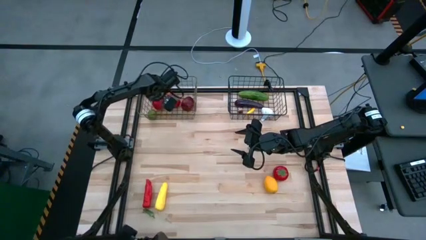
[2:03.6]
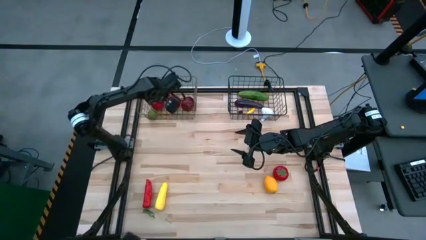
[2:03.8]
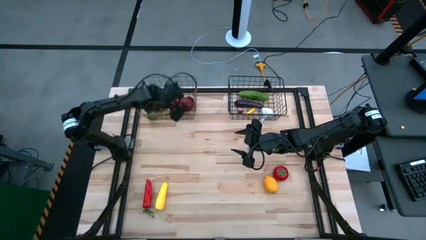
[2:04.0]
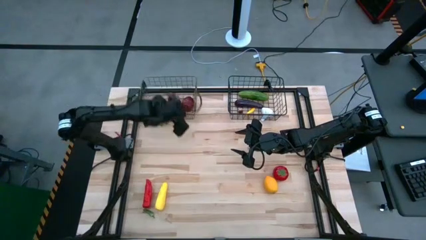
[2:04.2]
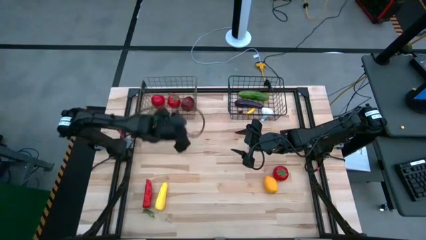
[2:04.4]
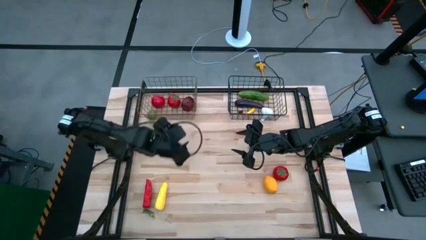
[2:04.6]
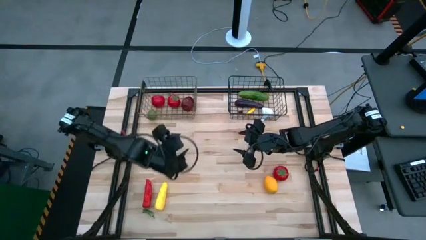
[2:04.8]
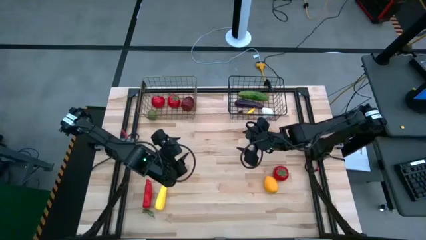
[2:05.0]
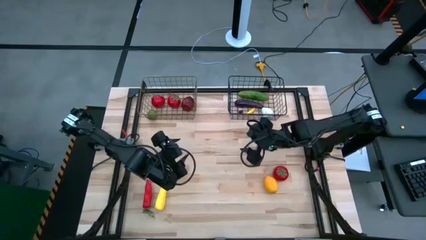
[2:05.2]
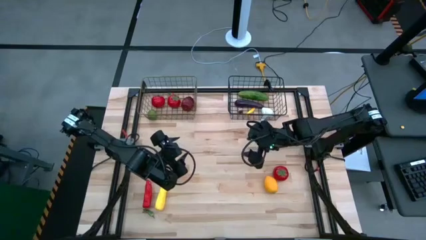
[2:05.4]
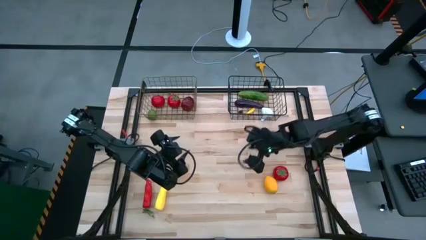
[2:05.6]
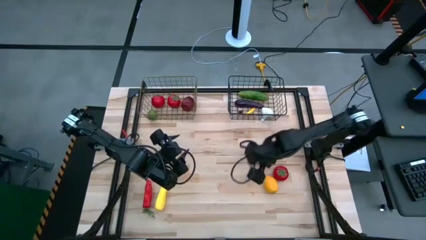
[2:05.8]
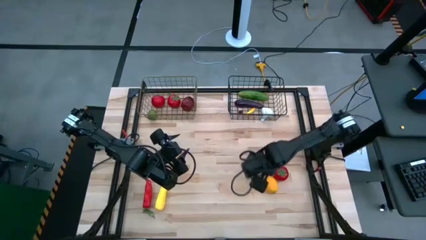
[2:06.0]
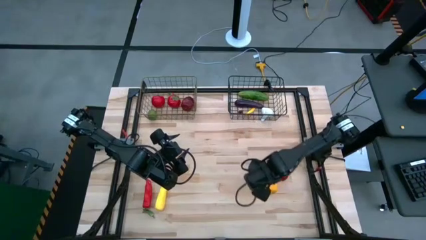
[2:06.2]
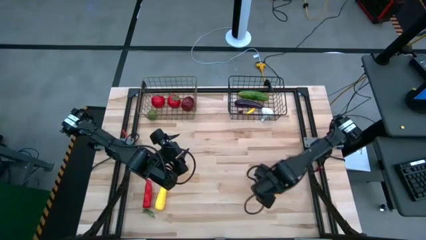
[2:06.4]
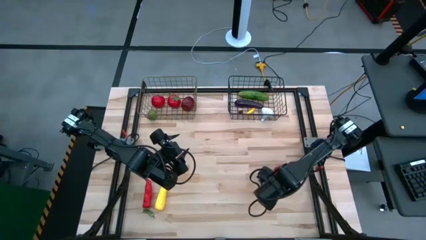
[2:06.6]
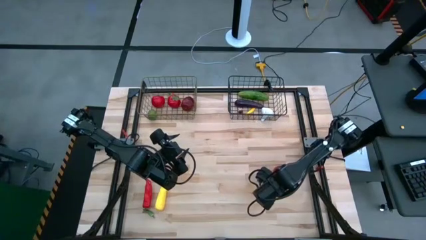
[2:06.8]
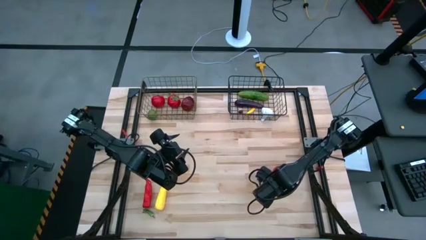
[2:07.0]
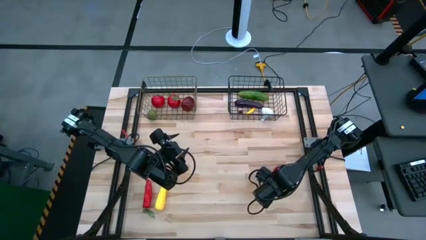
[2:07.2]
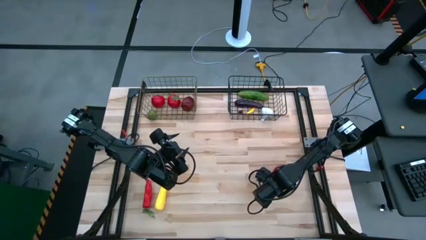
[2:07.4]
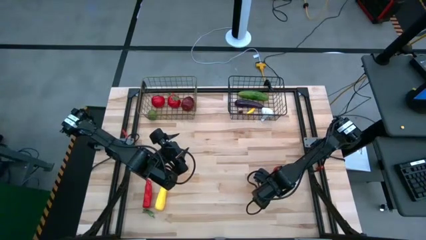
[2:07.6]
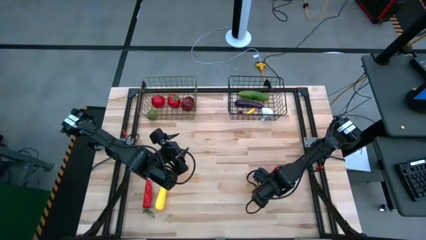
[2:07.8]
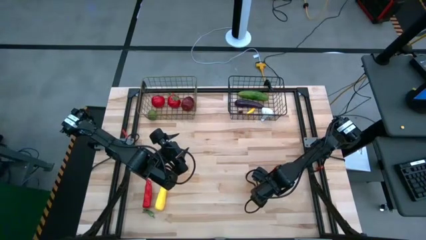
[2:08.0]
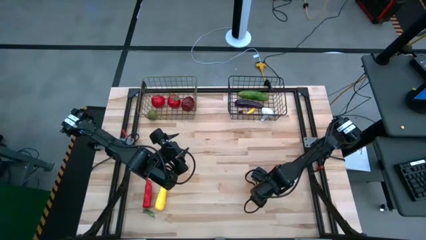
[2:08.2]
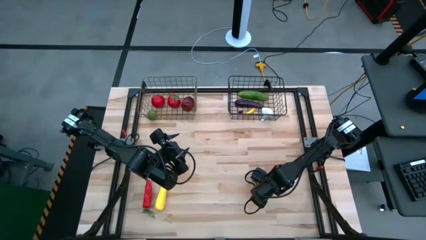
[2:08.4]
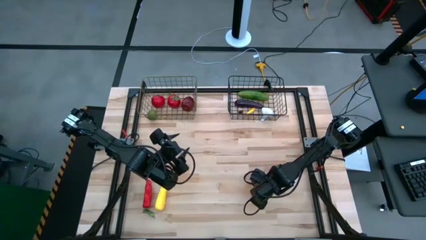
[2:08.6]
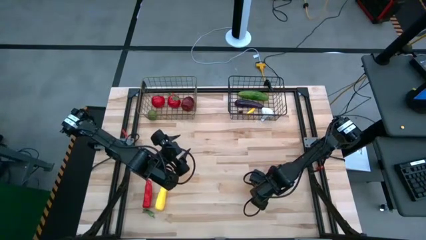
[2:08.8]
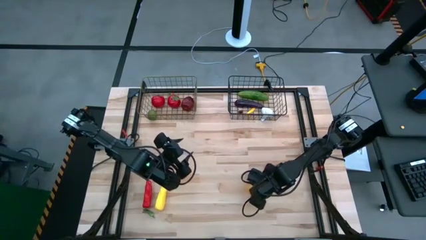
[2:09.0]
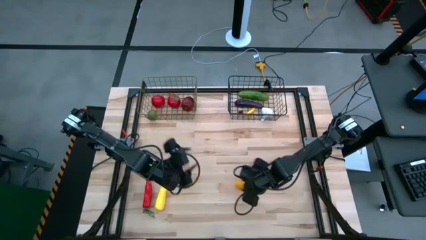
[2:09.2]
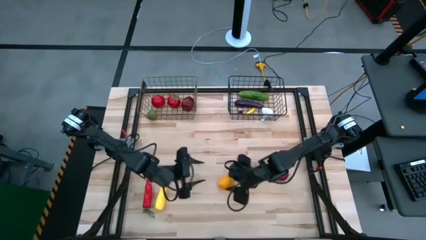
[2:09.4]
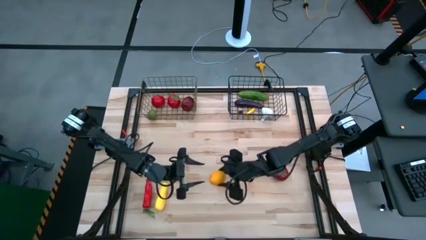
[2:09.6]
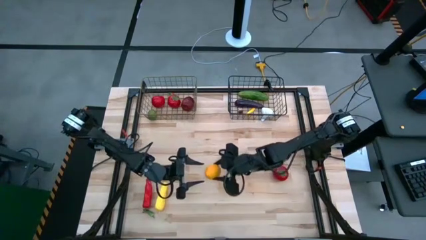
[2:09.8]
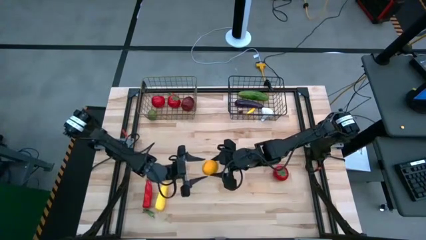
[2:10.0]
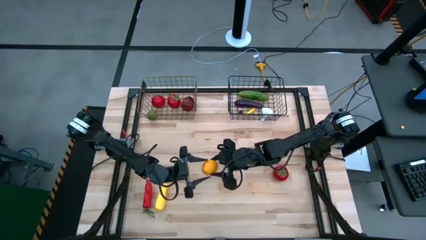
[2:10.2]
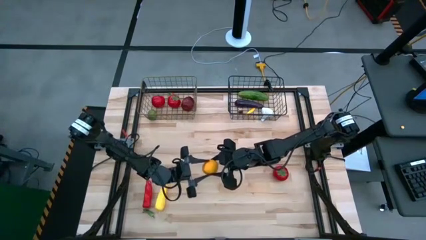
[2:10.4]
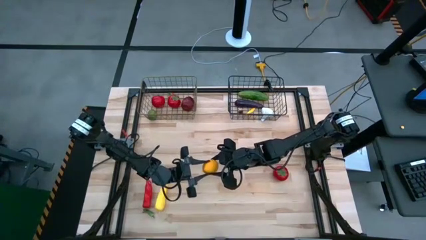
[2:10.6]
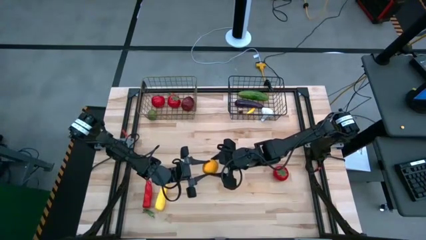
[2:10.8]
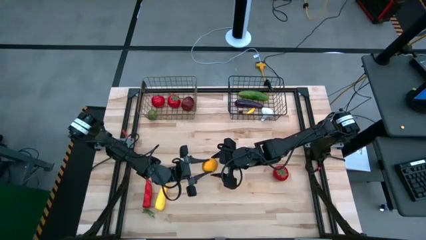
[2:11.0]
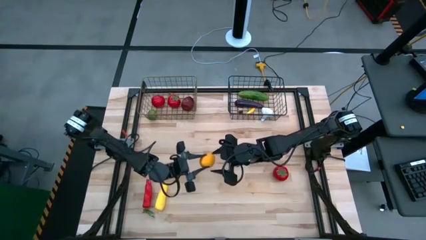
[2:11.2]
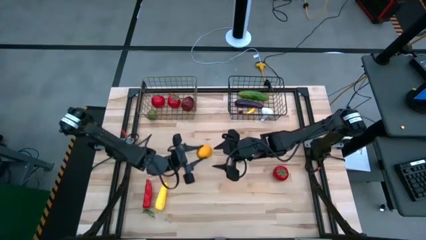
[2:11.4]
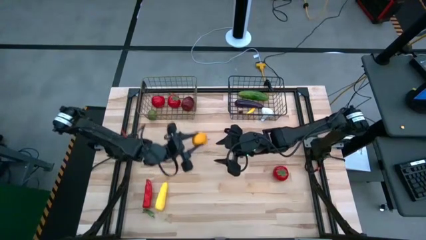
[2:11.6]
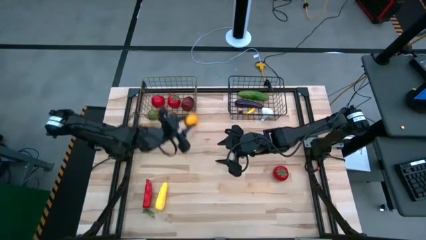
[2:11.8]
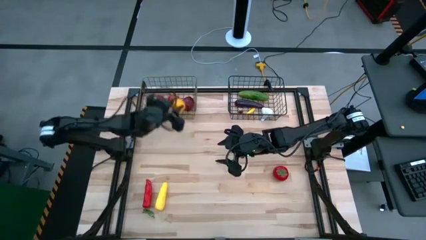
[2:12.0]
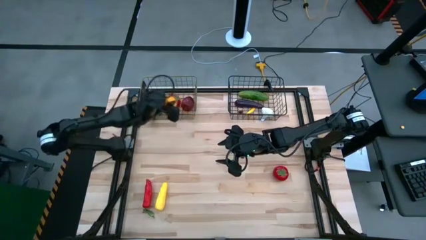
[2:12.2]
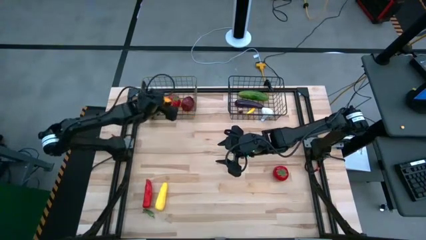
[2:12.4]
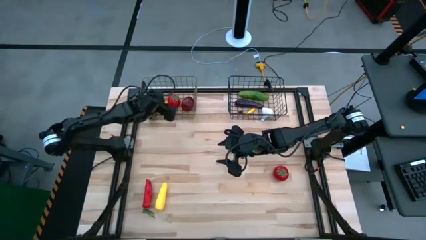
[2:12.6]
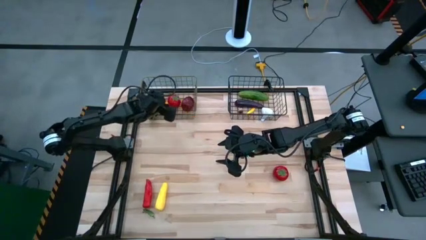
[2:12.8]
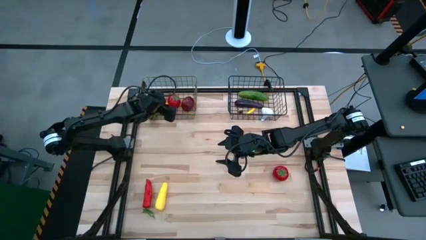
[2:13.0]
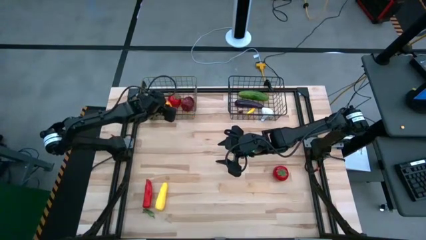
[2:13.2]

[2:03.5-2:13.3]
Task: Sort produce into baskets
Put the lemon into the left wire basket

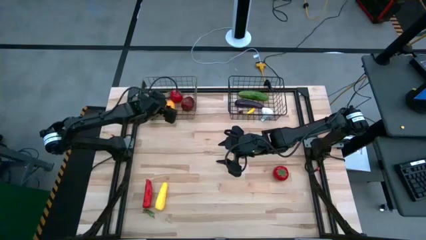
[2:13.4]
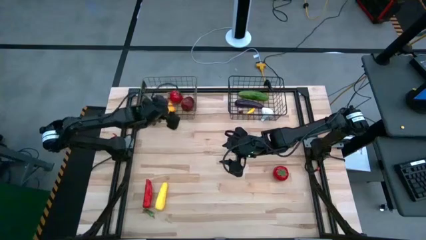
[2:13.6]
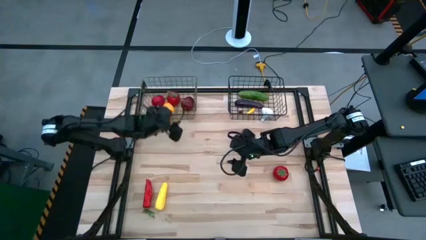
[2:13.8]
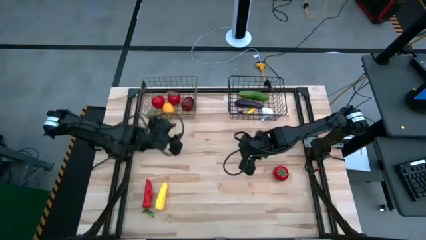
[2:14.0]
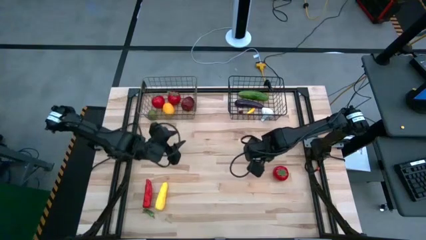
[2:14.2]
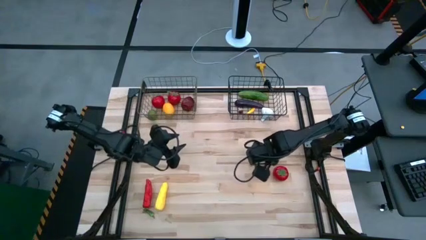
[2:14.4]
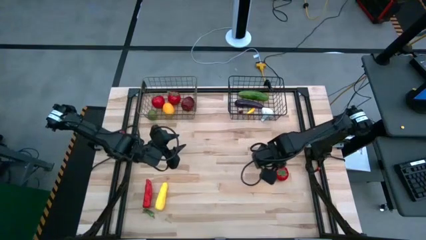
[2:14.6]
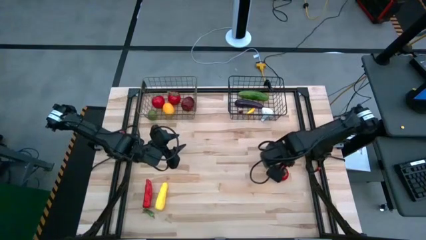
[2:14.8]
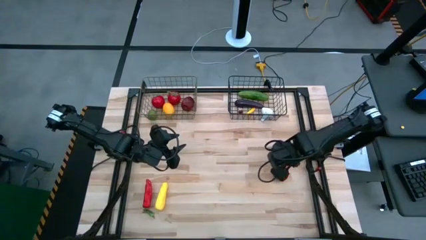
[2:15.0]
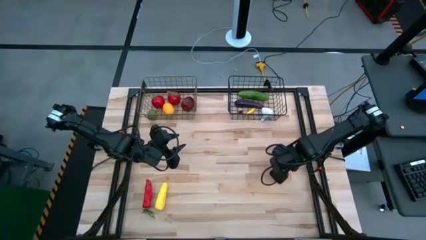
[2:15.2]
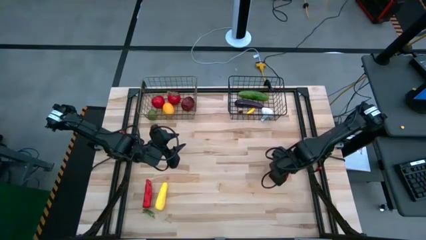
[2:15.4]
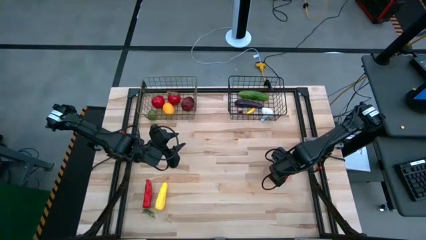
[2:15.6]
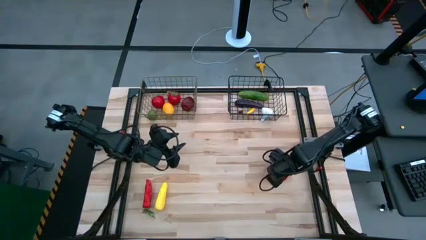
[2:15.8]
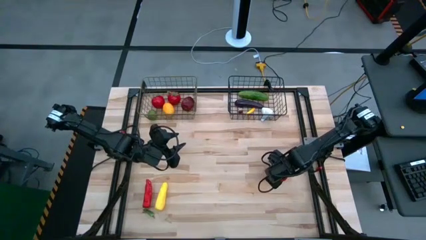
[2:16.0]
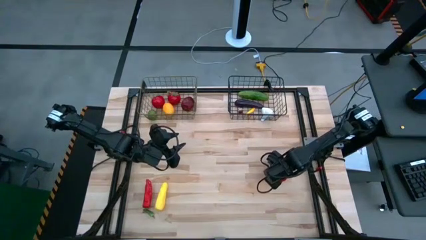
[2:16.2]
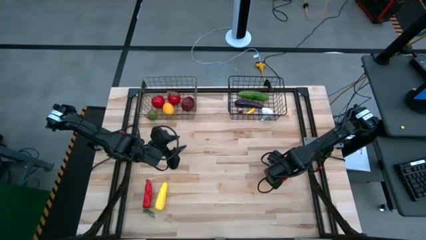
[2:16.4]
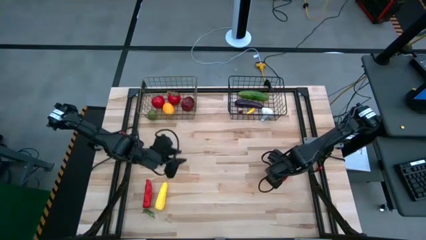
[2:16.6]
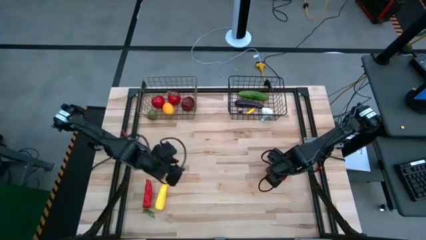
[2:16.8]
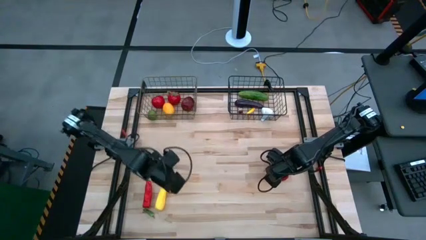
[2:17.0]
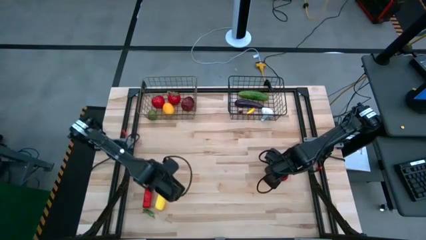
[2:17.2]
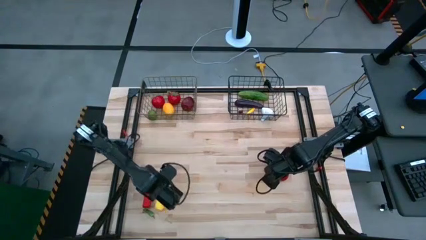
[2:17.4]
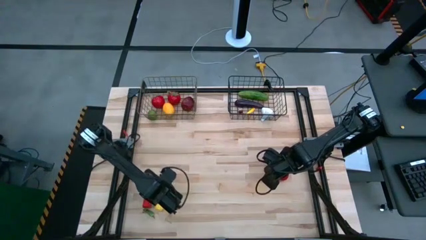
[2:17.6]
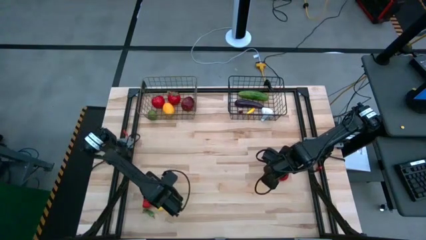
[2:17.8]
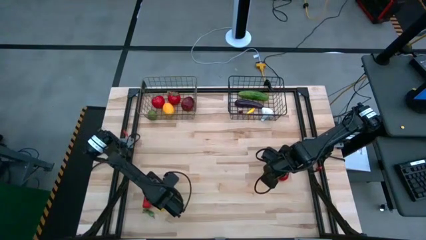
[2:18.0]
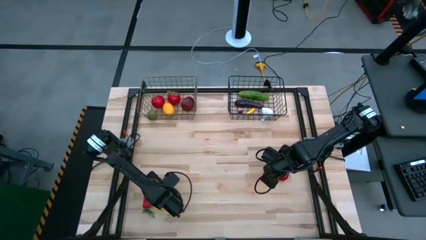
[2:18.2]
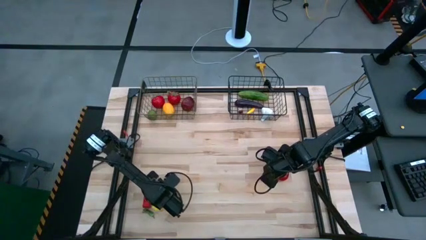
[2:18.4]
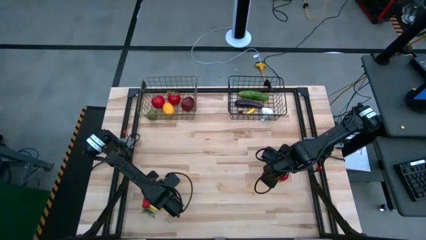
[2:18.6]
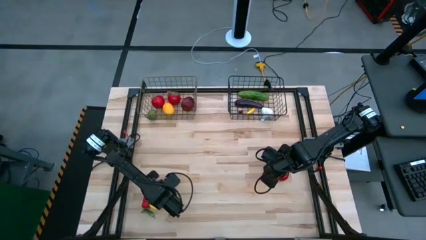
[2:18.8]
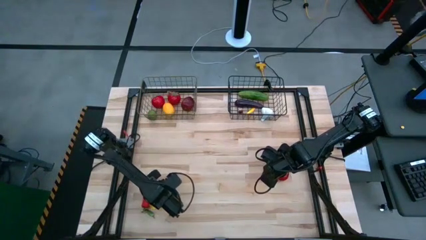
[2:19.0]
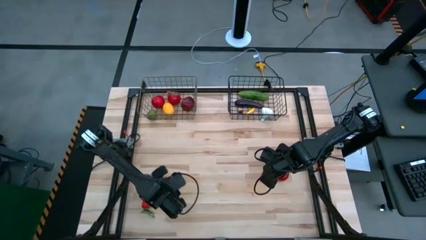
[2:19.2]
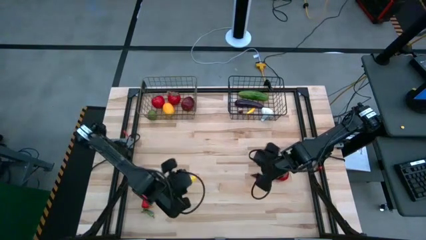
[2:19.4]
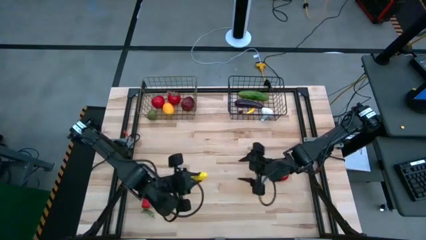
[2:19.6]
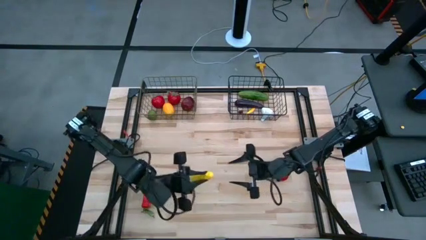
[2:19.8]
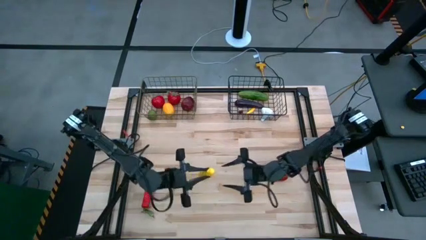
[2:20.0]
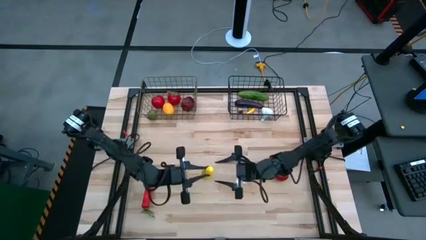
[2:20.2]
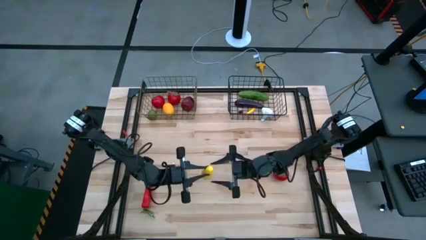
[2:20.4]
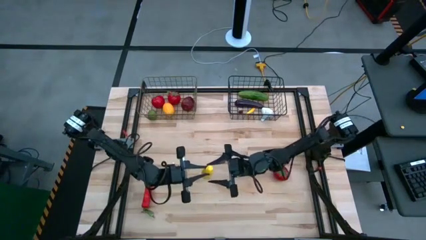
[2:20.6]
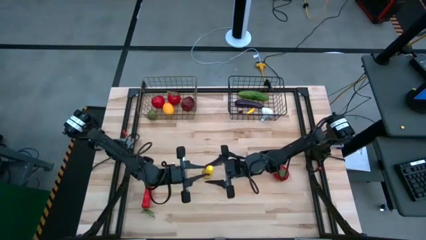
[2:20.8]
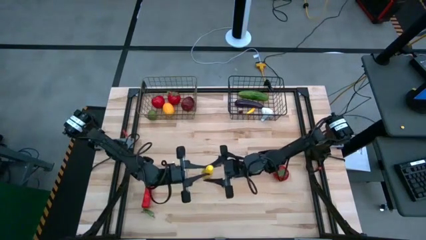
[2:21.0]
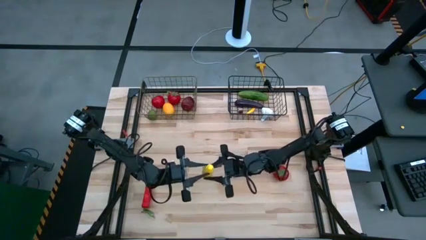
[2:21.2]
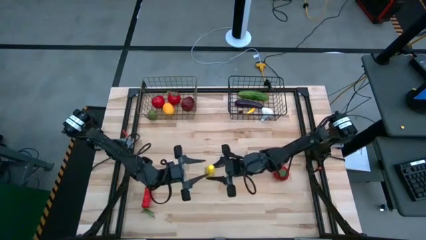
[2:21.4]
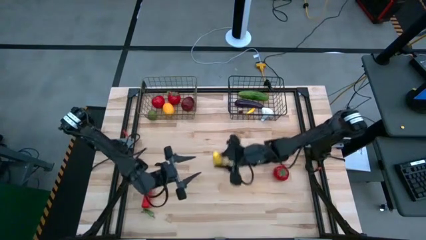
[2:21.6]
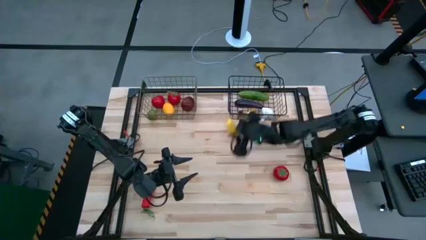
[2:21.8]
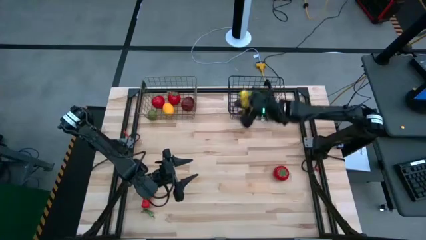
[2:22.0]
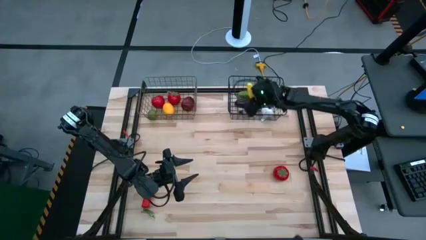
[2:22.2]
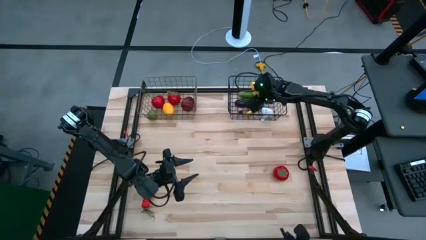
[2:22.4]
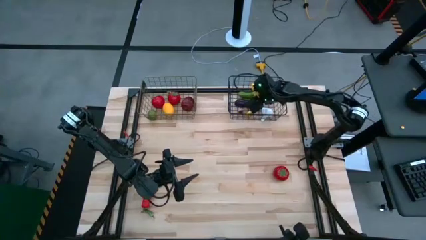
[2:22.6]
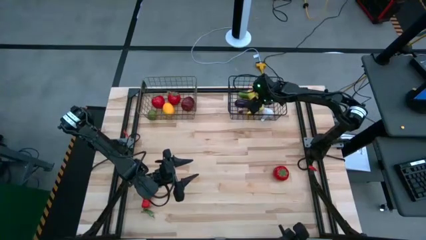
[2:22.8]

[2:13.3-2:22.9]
Put the corn into the right wire basket
